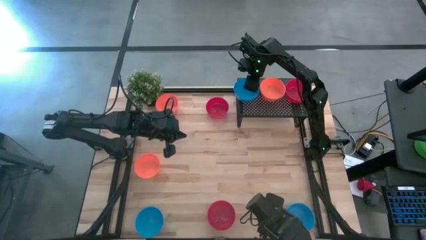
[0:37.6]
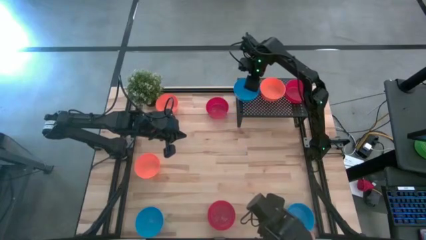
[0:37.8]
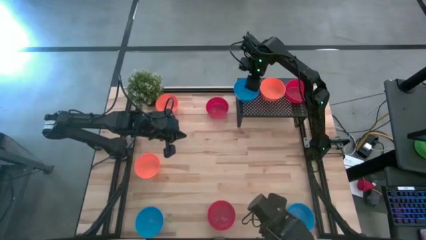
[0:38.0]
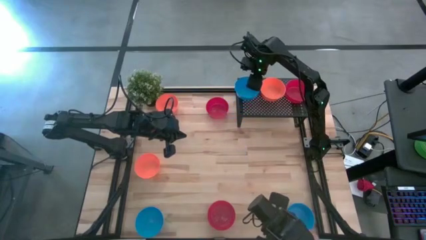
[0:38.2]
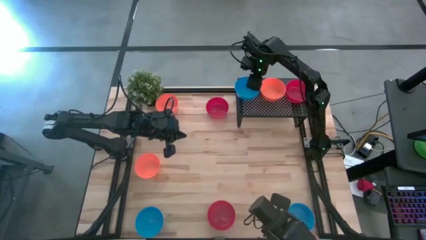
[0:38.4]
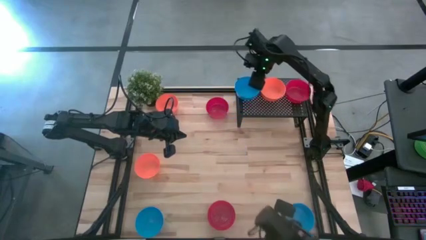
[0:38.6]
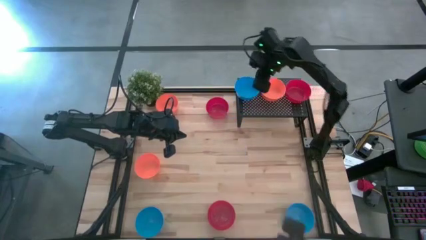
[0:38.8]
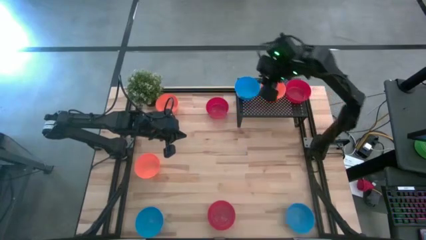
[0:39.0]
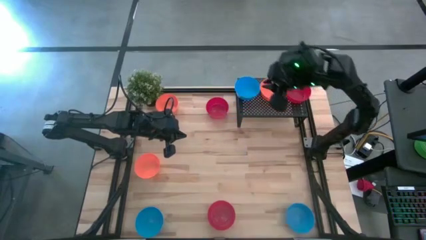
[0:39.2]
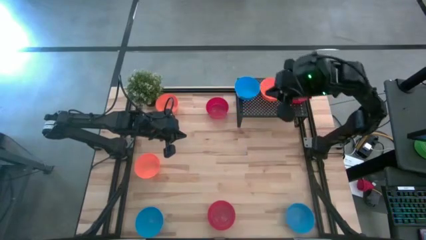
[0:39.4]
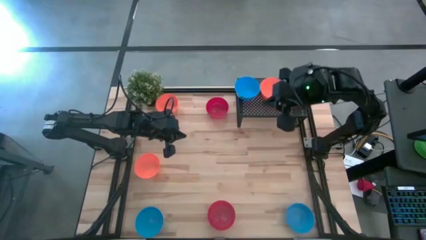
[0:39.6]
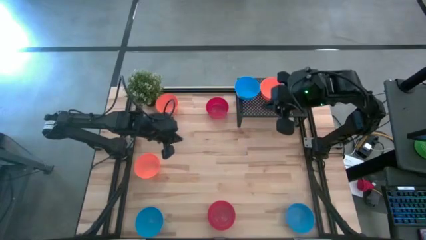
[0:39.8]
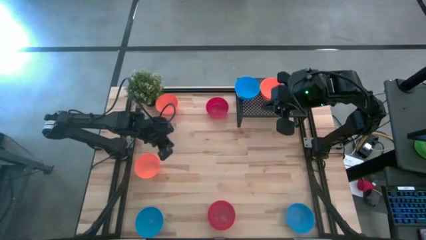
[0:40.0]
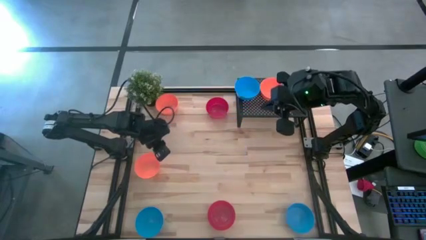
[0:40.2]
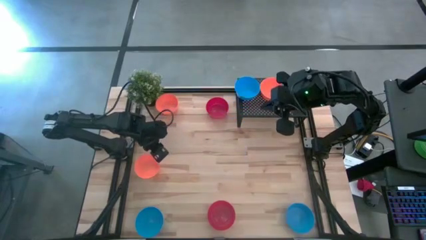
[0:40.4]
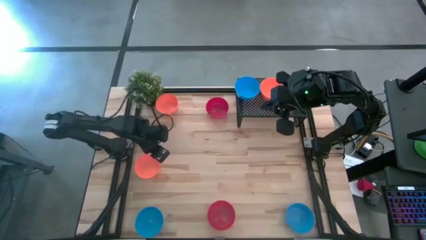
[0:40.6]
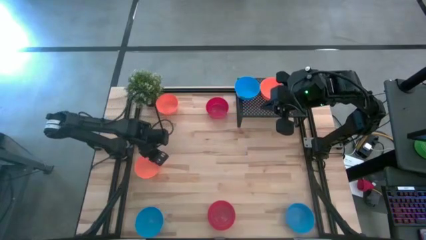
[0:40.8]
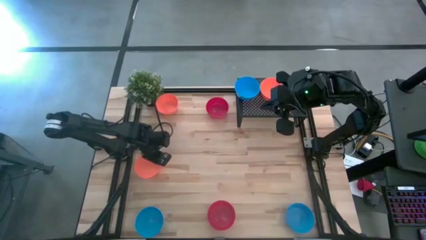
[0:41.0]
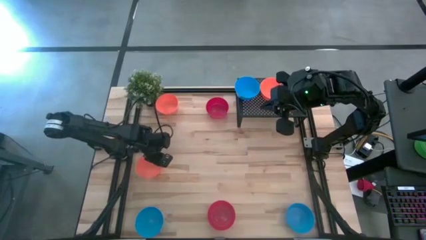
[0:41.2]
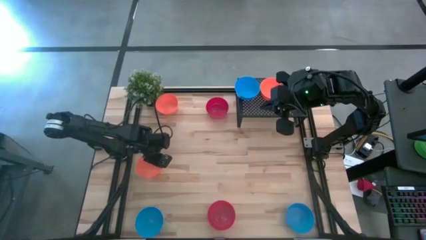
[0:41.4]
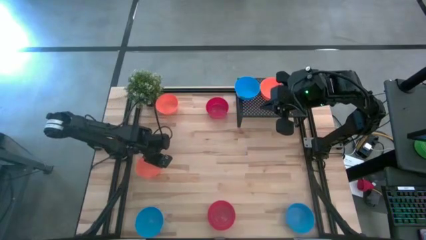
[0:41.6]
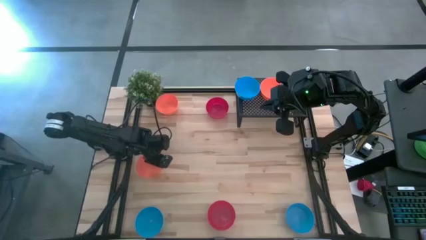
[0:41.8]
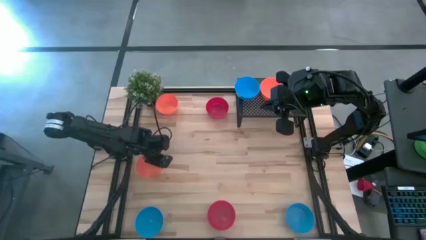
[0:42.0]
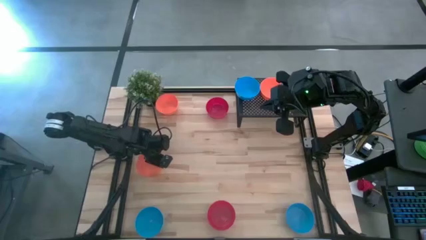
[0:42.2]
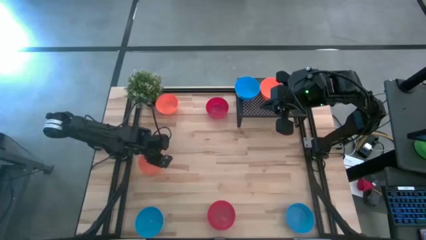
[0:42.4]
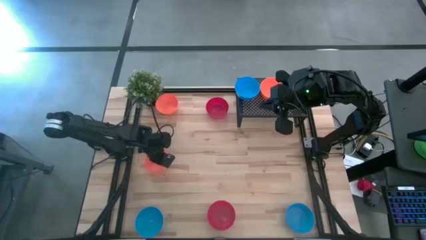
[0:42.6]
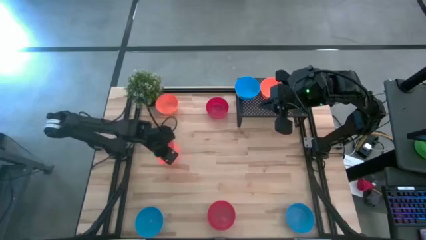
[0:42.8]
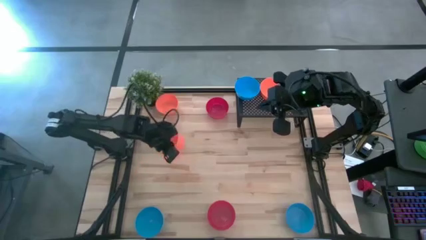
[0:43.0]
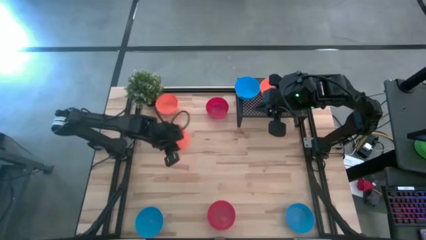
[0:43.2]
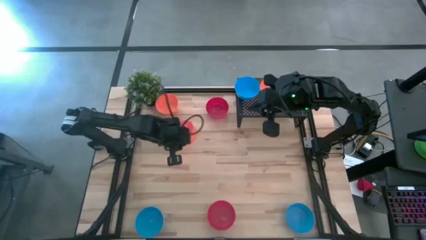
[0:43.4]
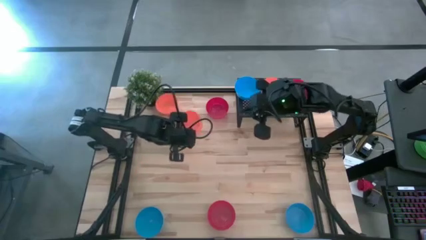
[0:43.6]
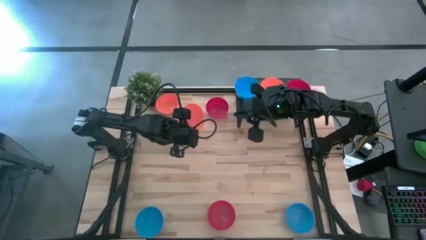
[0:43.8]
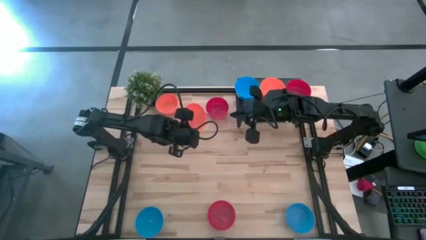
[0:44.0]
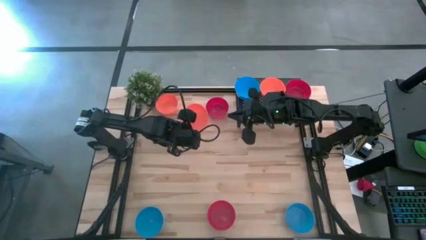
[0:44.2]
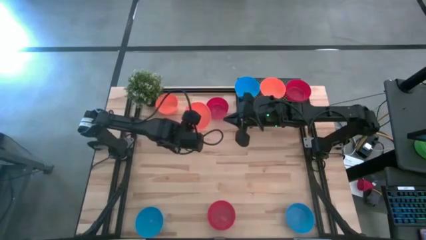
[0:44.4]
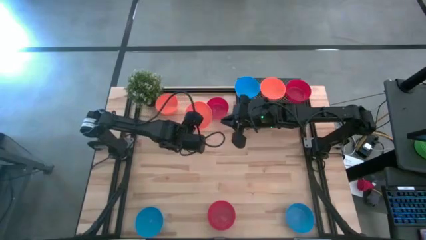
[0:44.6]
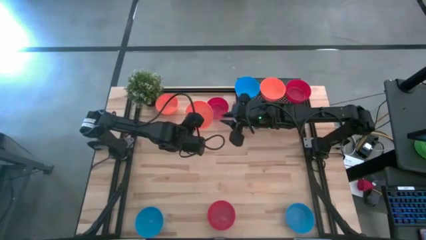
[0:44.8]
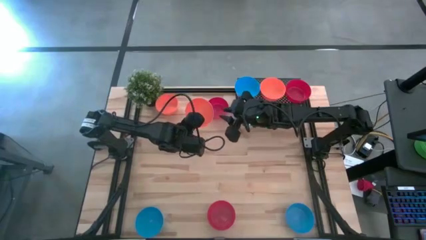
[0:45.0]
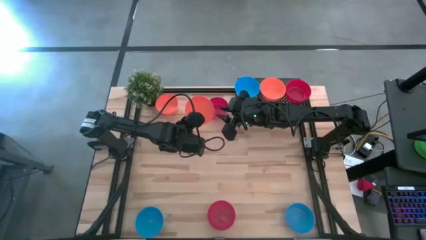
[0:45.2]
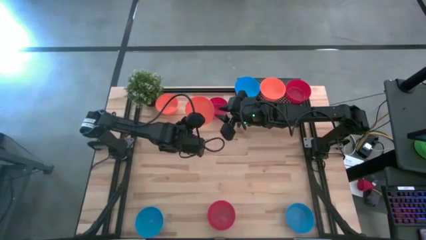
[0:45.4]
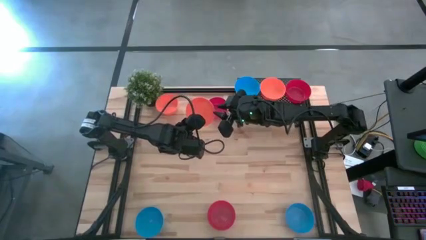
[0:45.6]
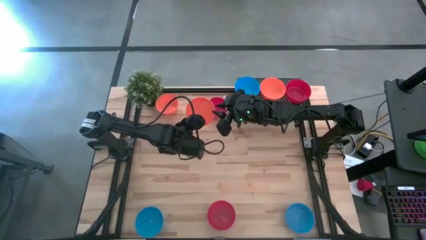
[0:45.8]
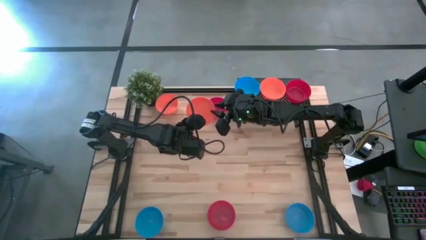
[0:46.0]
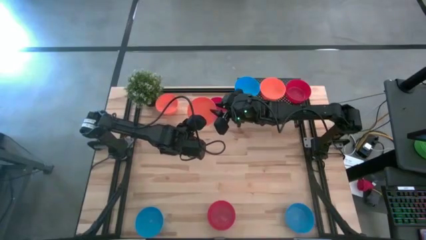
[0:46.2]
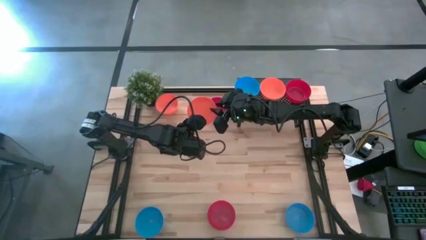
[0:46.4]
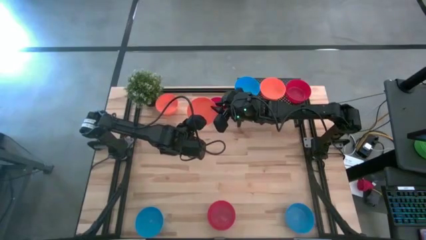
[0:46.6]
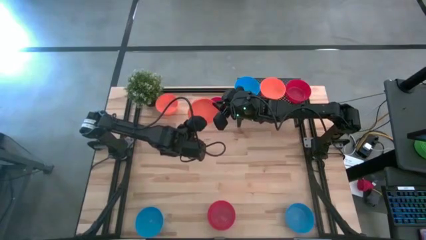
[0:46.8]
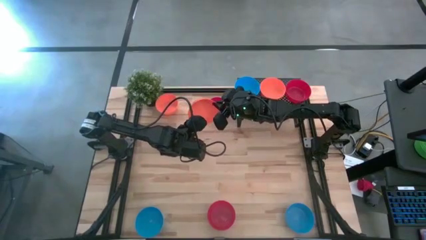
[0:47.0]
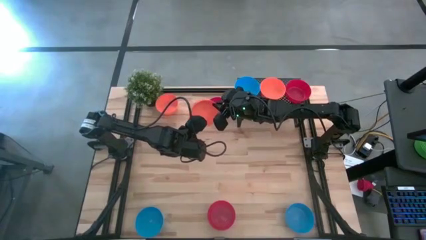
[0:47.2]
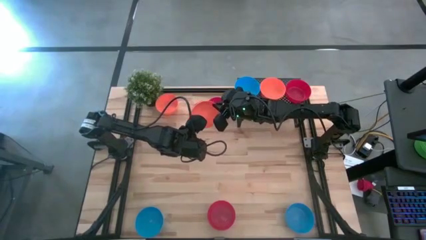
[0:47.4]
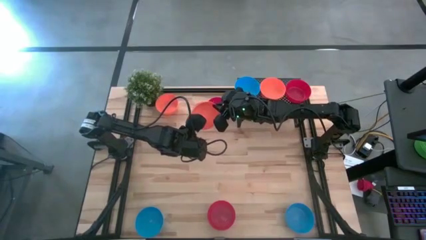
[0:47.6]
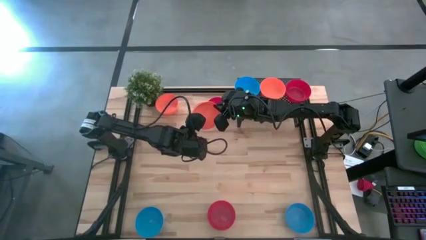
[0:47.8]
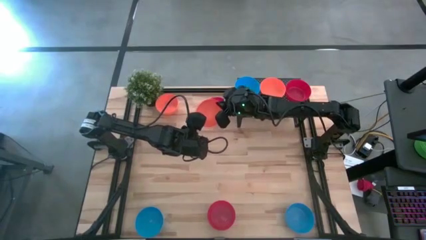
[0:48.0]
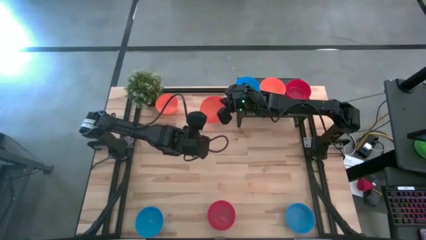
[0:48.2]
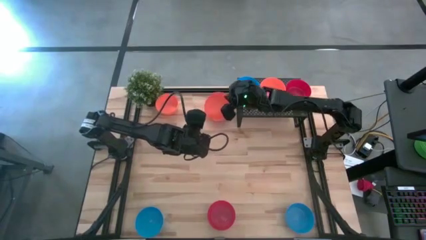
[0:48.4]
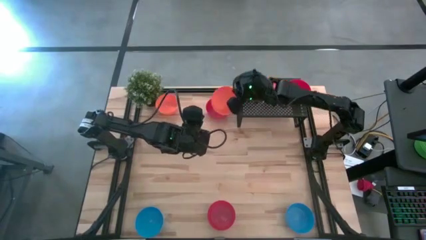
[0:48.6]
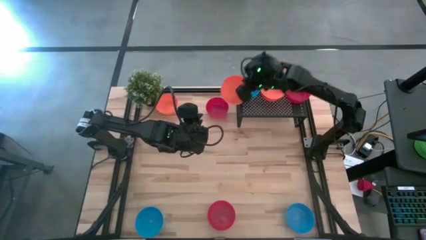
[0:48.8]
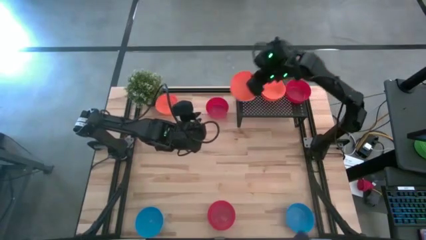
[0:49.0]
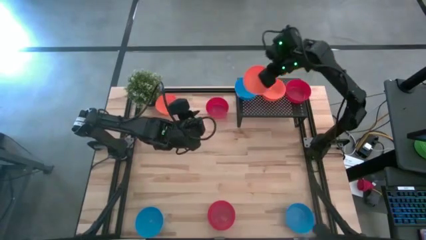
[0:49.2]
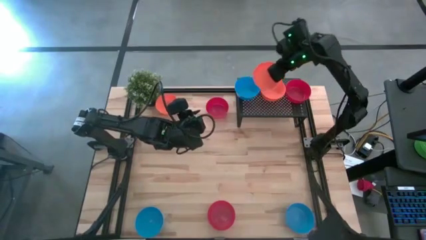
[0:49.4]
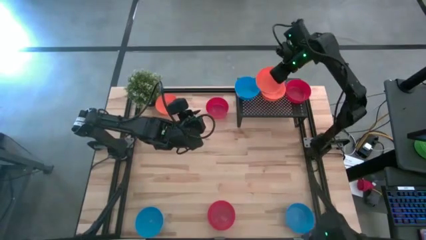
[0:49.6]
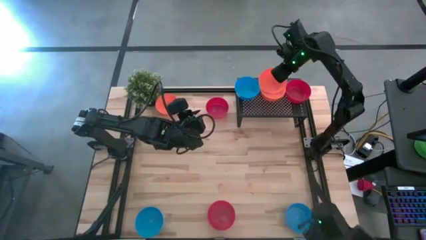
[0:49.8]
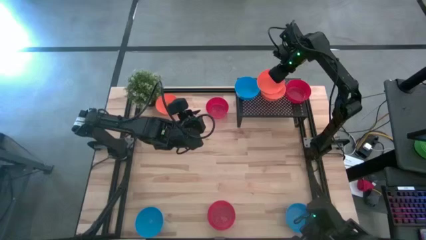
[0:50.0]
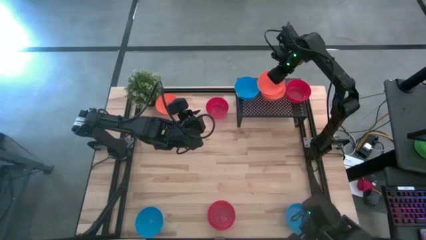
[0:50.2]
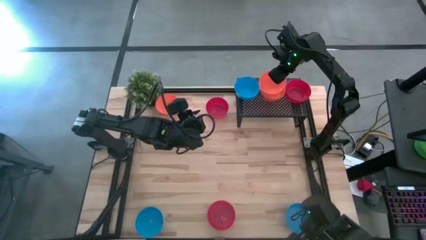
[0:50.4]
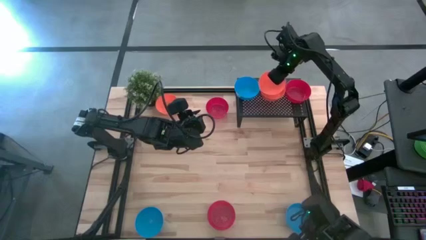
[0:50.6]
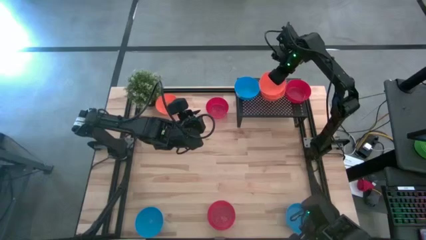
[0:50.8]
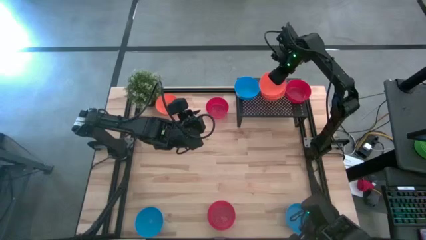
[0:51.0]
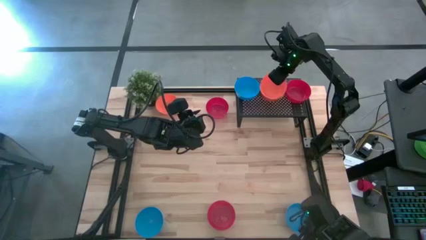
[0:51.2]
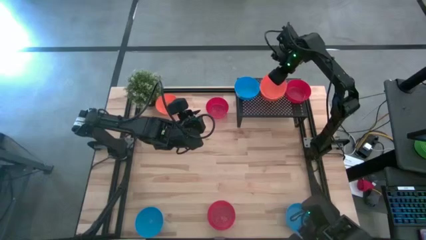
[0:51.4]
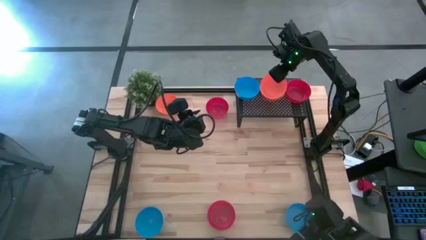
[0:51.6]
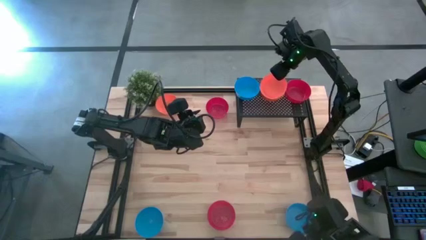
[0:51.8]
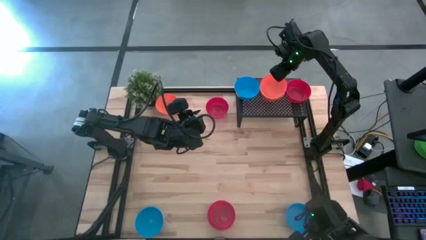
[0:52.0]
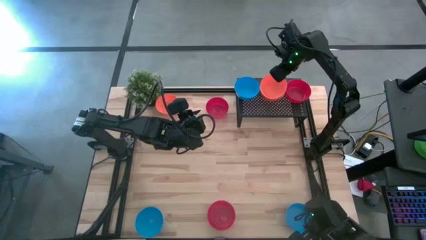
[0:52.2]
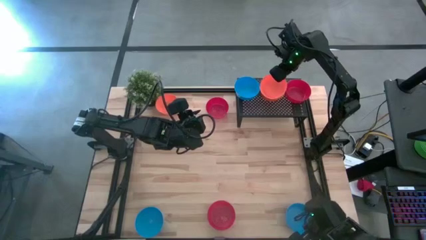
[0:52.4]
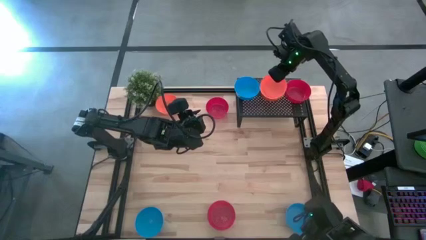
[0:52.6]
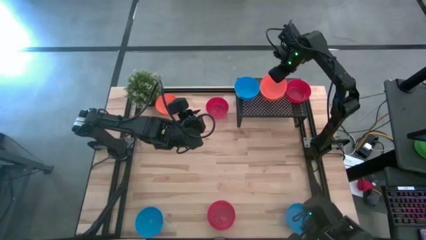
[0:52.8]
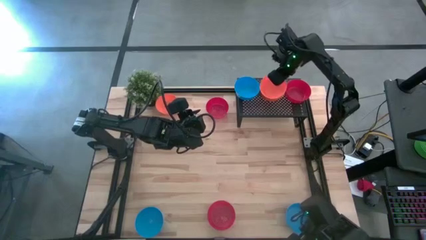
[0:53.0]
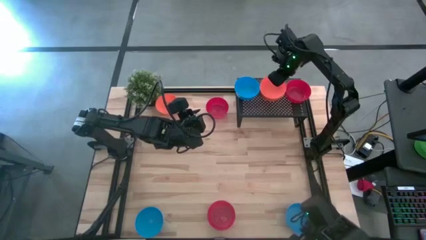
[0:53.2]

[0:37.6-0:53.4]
Task: Pick & Place Mini bowls
Stack the bottom orange bowl on the orange bowl

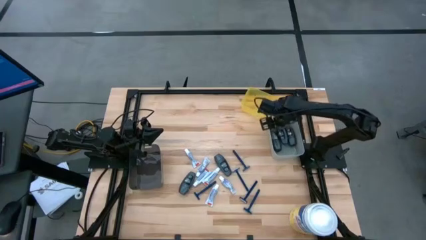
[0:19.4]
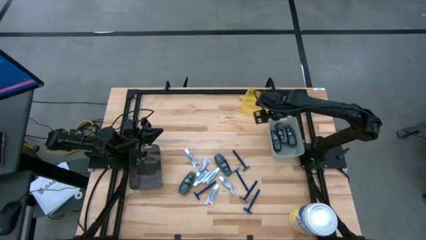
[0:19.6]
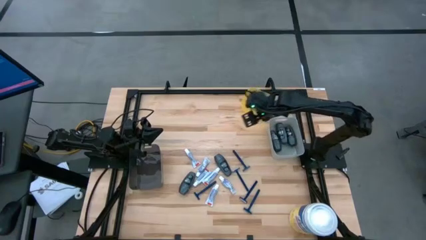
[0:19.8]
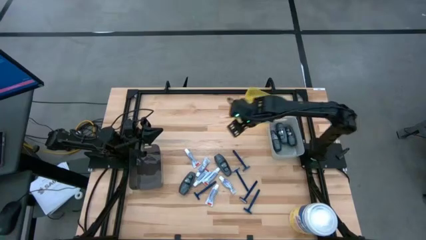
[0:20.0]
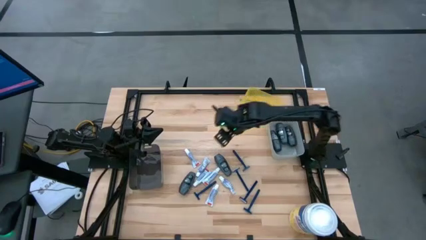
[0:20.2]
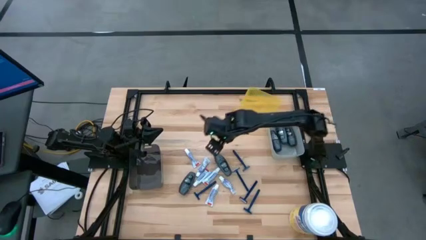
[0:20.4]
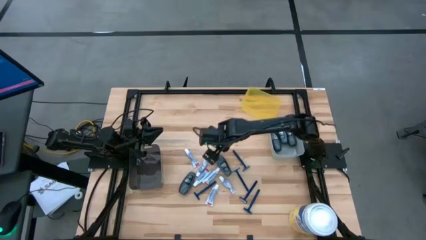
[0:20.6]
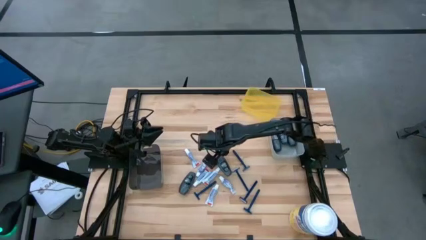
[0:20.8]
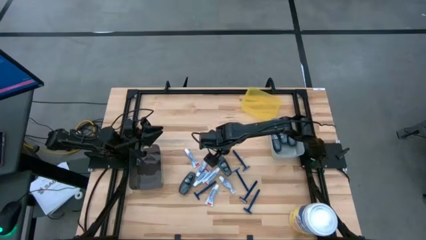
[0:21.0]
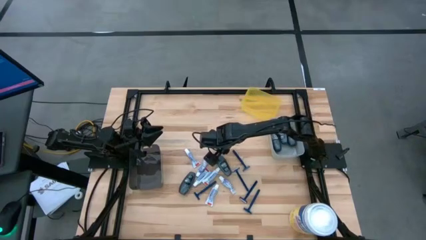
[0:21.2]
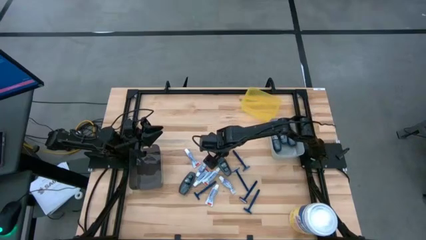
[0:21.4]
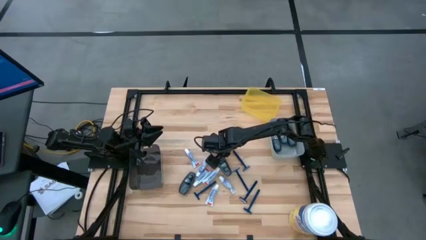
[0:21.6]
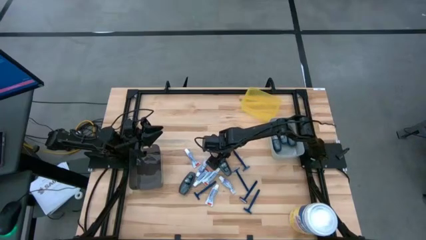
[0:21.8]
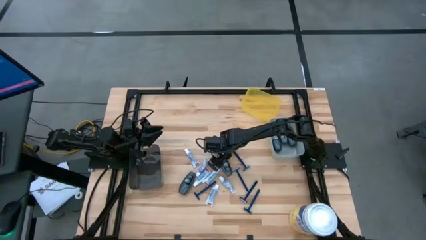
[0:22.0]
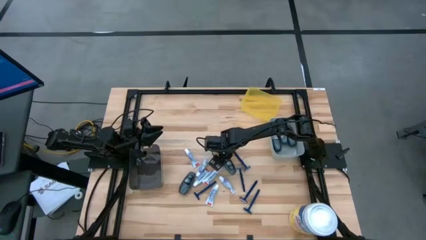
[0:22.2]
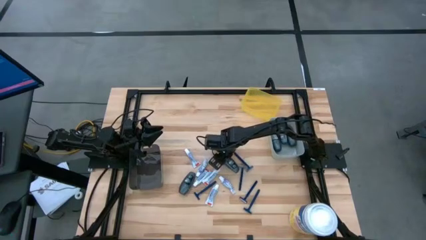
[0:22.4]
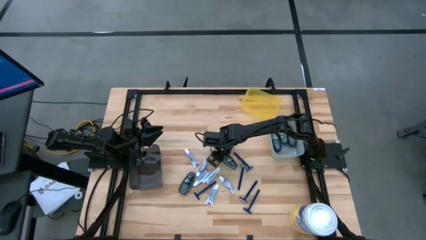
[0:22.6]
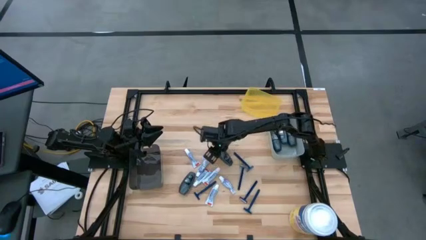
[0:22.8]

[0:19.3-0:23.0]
Task: Pick & Place Travel size toiletries
Put the gray deodorant bottle into the white bin
